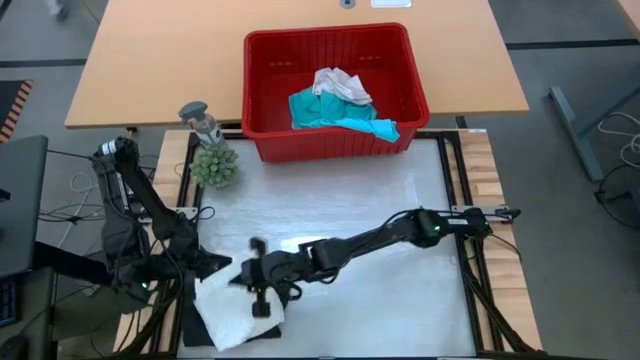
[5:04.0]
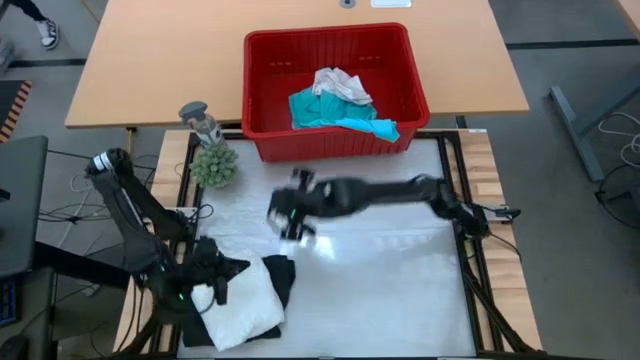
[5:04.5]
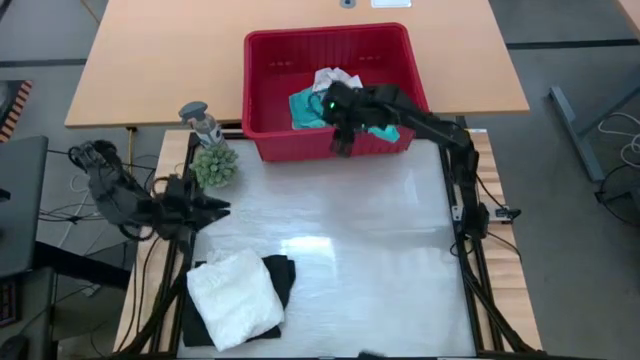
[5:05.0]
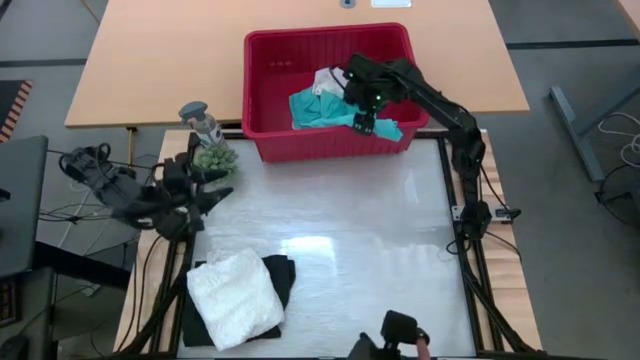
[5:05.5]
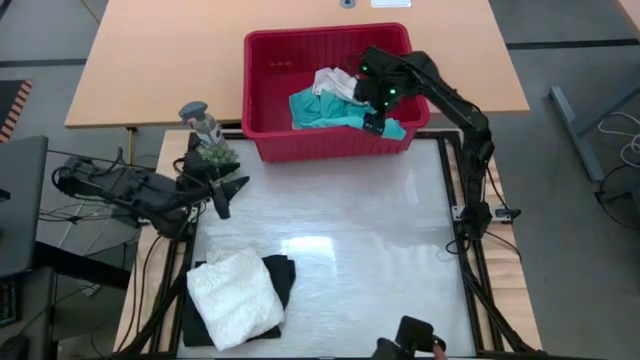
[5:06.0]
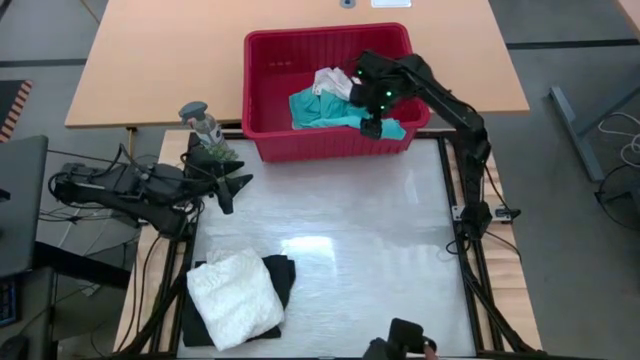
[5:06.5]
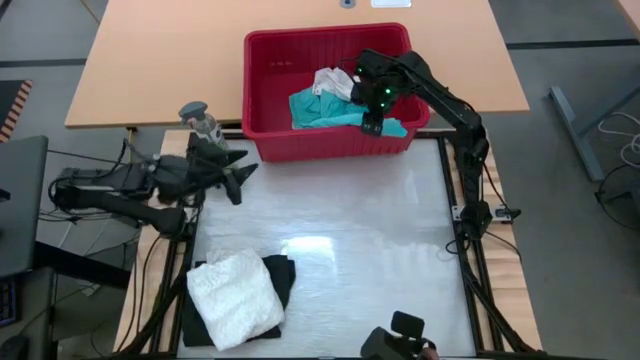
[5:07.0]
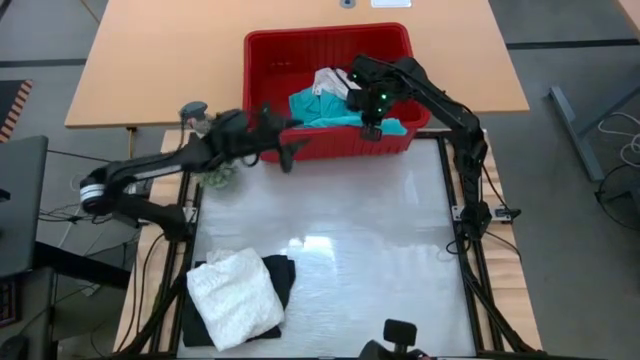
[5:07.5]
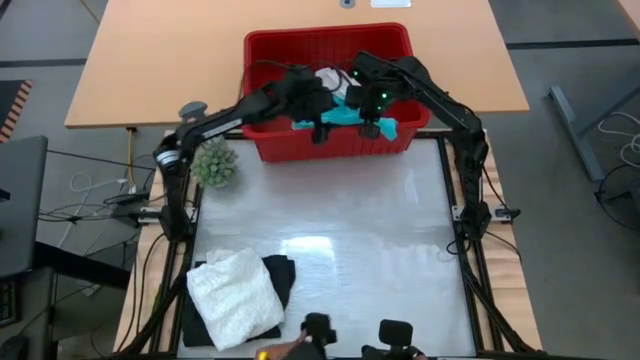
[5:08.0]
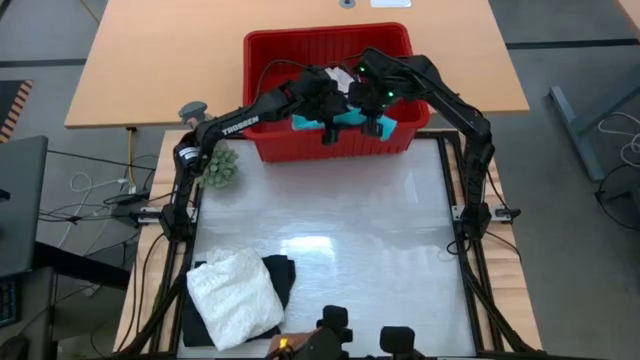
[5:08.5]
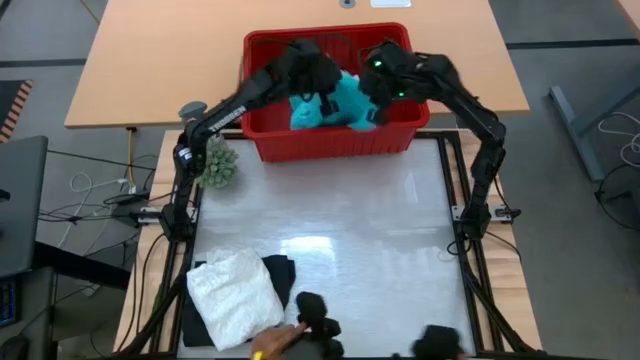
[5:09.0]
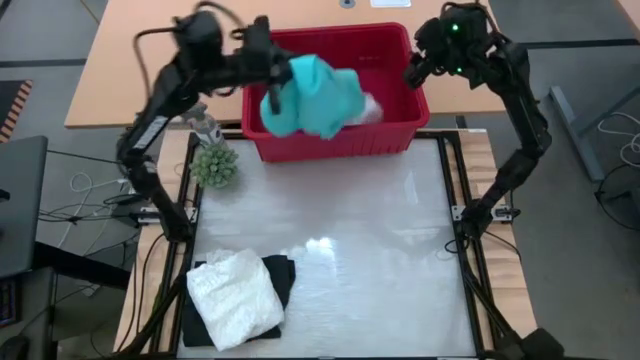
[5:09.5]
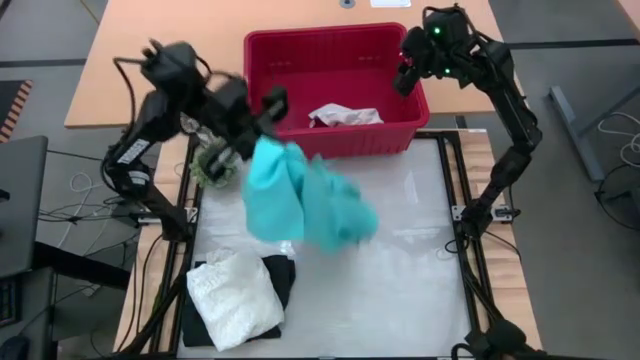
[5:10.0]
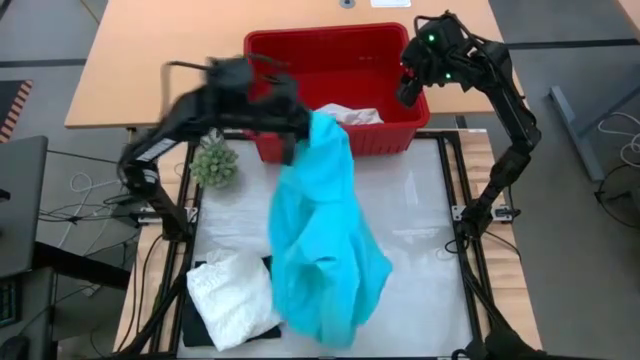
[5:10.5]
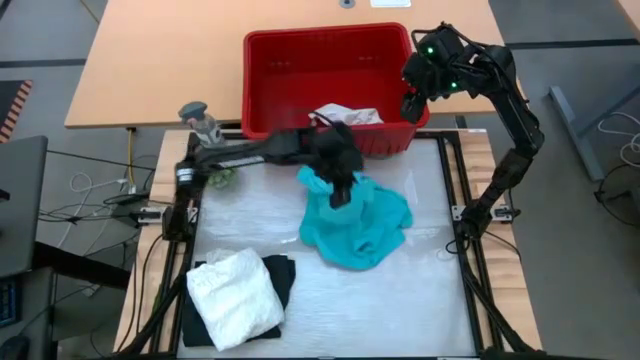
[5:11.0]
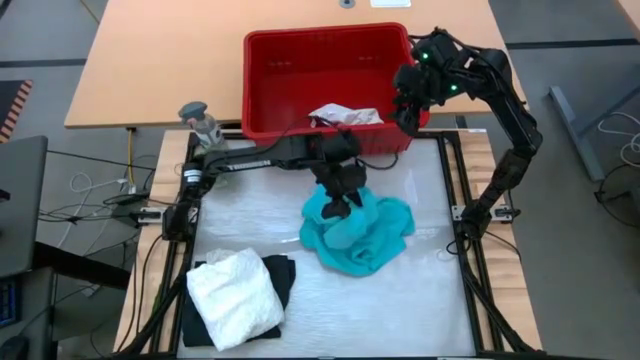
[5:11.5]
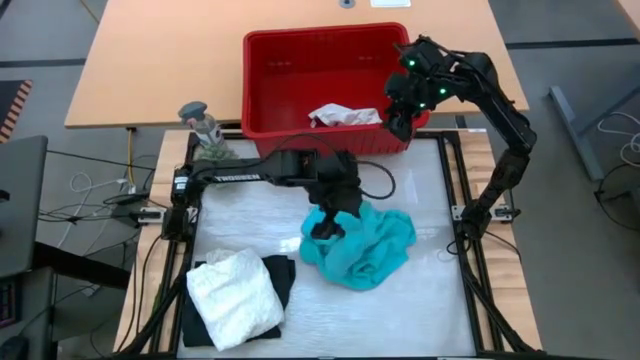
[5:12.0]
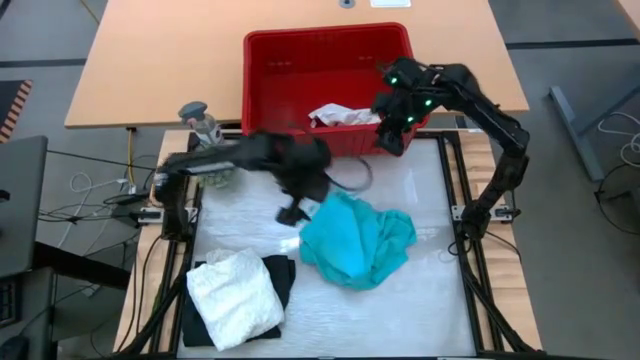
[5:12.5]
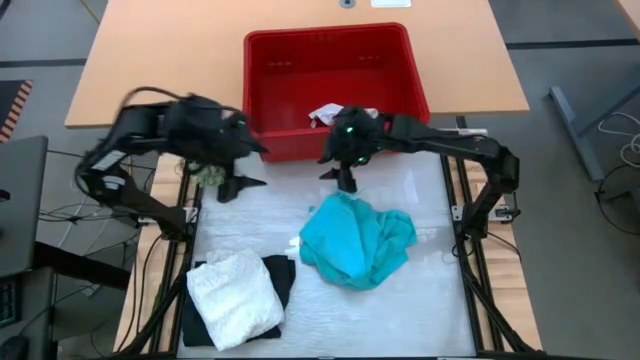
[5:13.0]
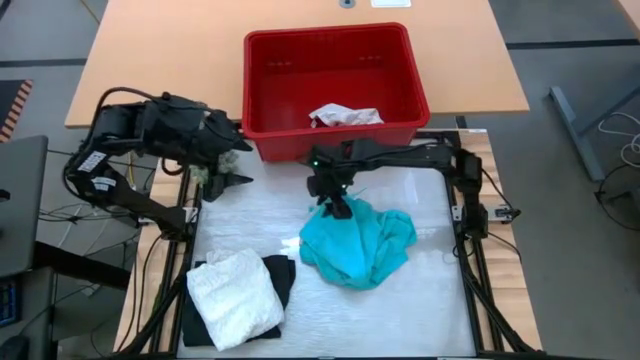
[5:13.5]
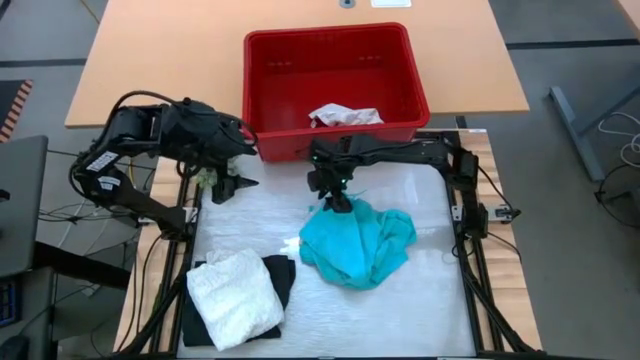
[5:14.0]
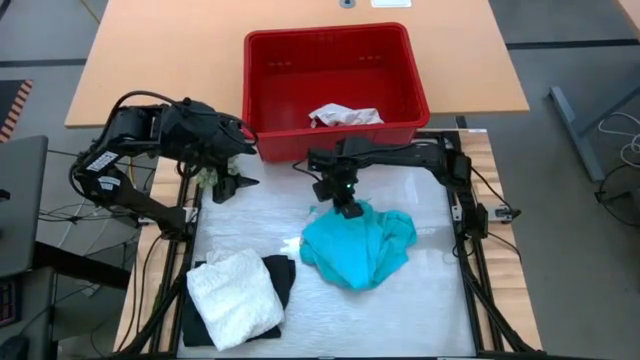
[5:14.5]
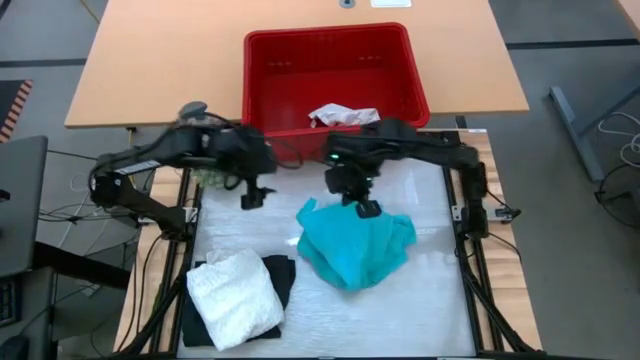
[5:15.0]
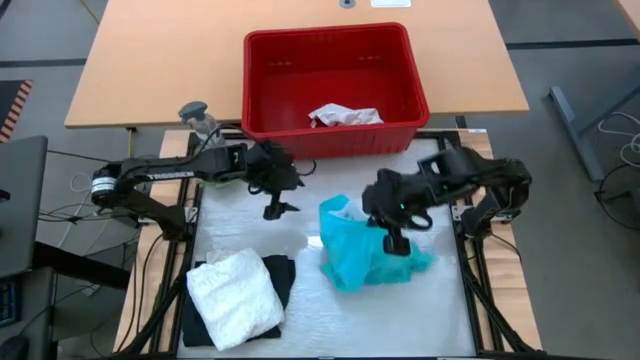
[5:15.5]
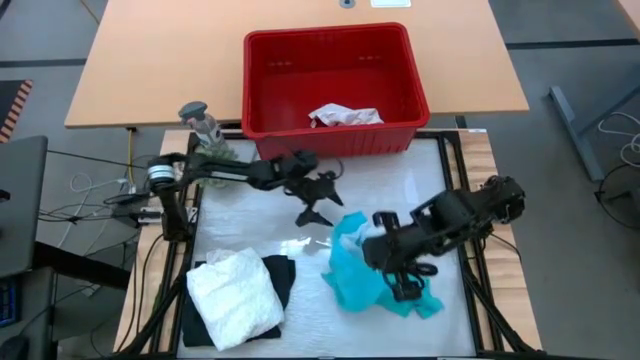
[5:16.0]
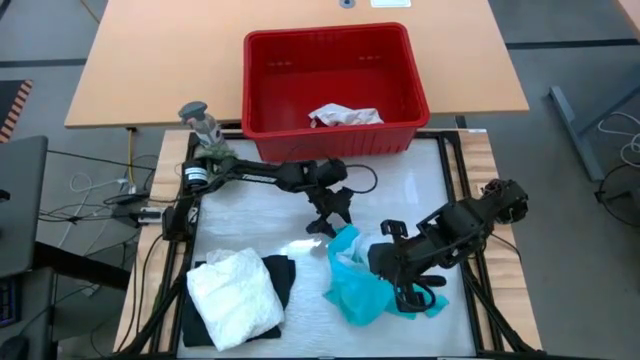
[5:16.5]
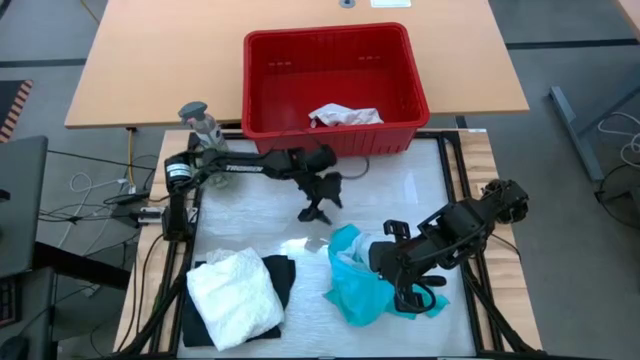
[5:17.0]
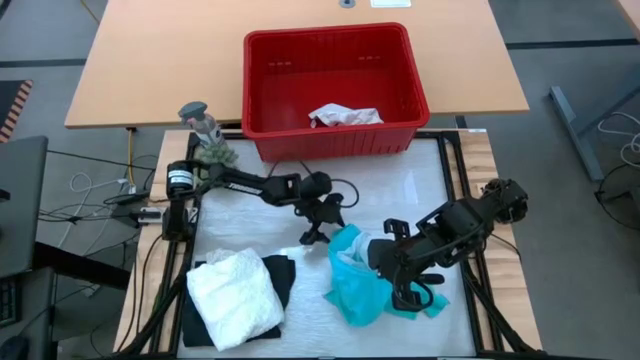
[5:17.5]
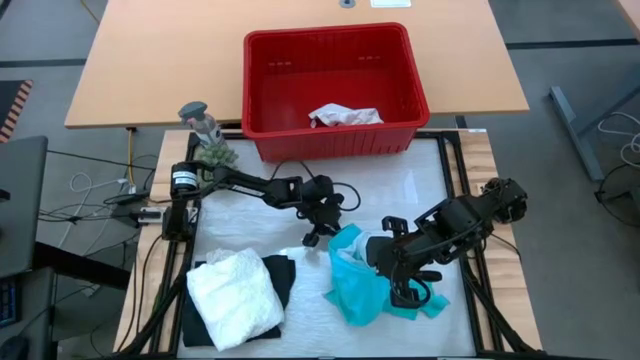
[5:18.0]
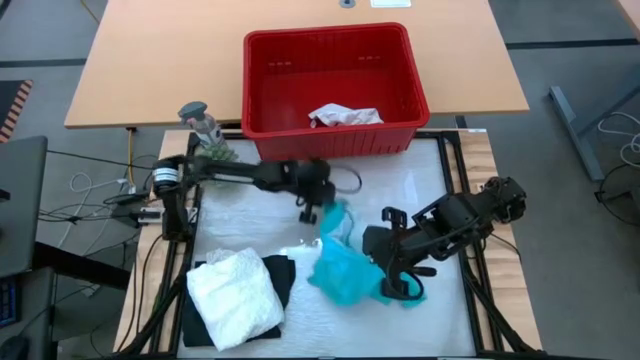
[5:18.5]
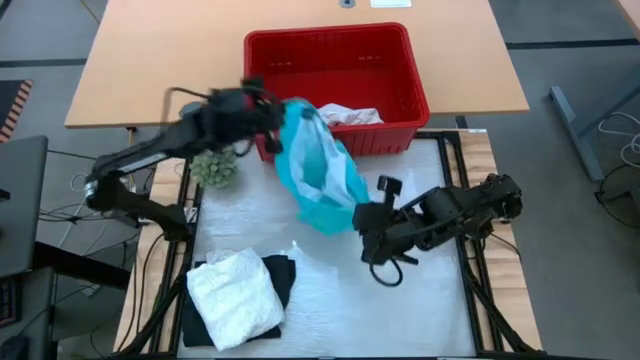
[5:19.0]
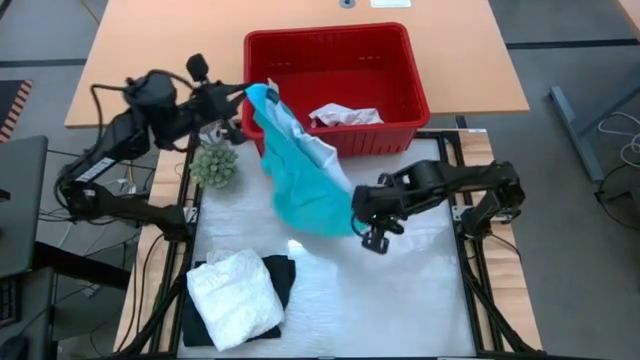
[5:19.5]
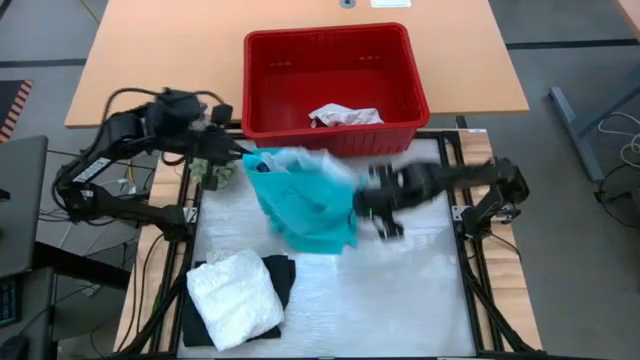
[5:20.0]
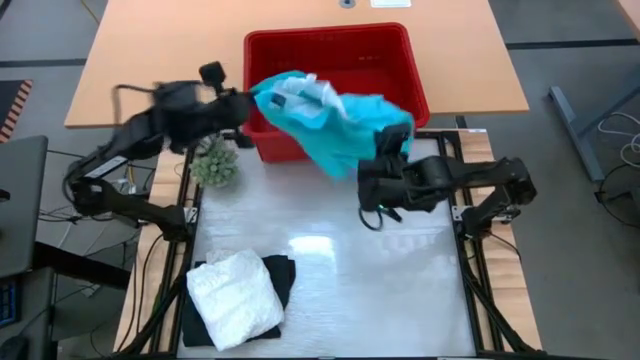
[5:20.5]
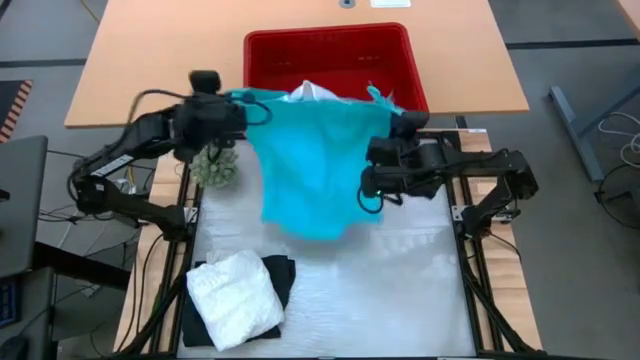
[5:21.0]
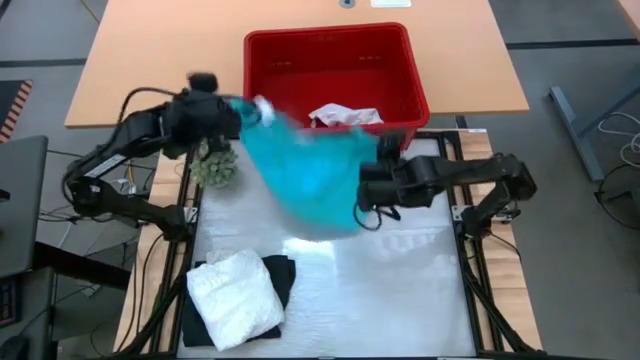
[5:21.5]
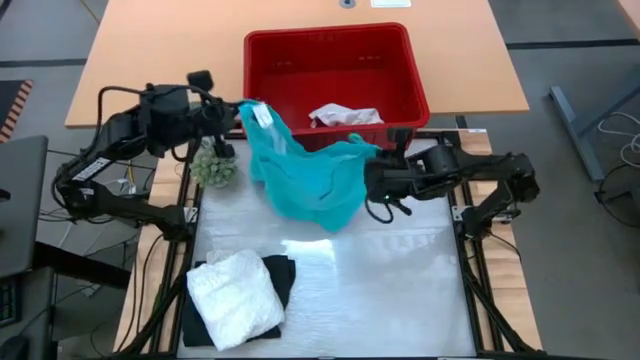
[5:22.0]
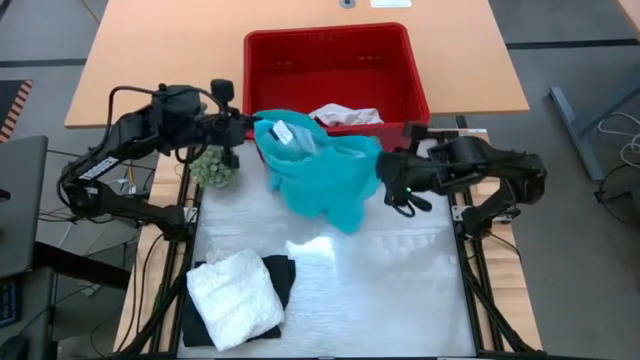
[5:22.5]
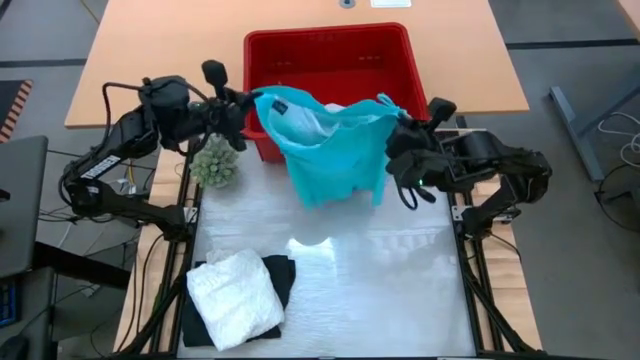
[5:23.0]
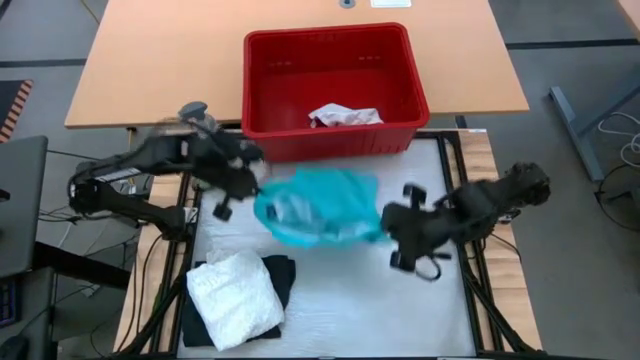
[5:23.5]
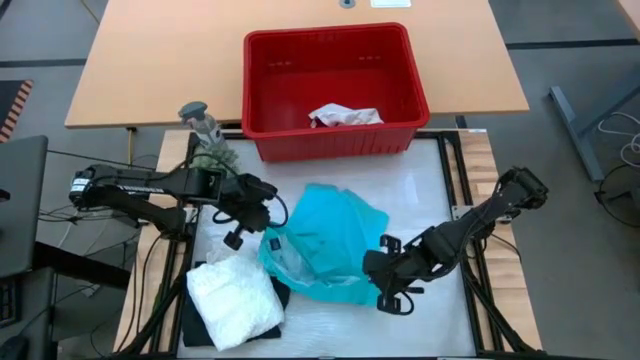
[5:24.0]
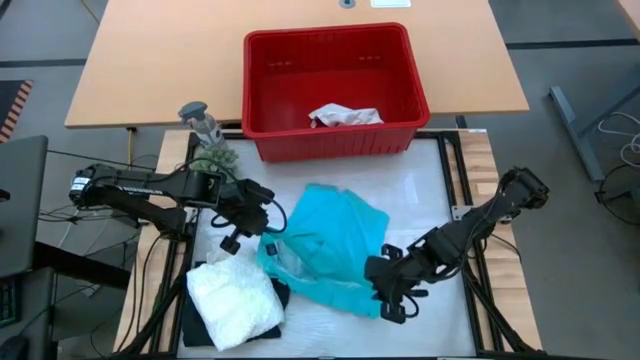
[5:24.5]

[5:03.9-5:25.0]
Task: Fold Laundry from Bin
Fold the blue shorts
